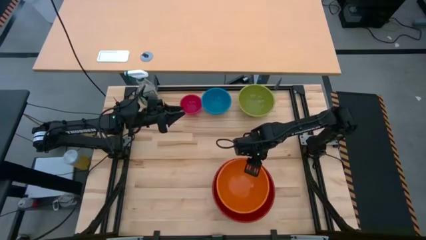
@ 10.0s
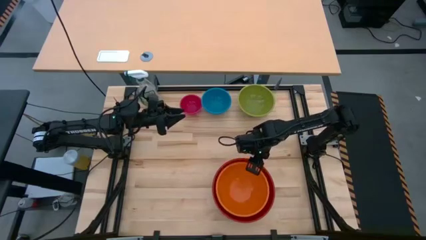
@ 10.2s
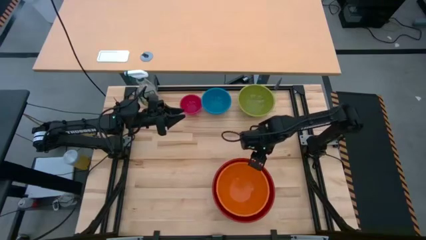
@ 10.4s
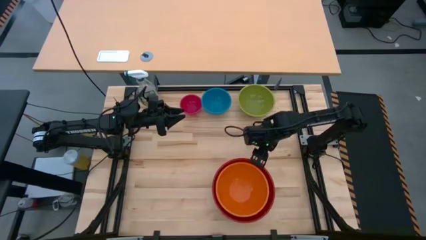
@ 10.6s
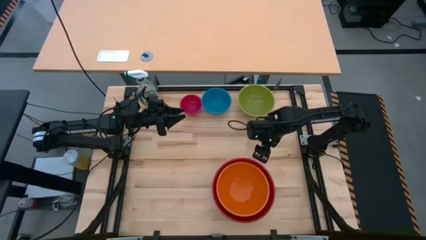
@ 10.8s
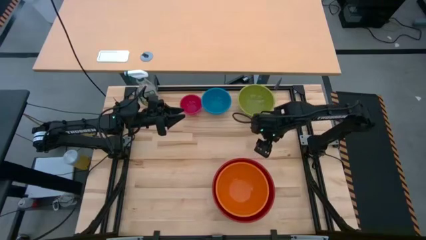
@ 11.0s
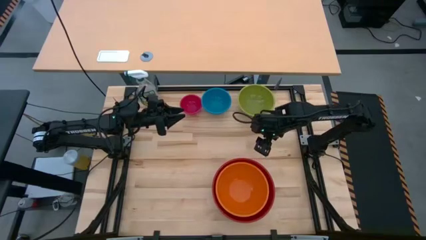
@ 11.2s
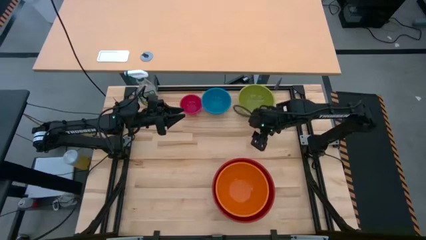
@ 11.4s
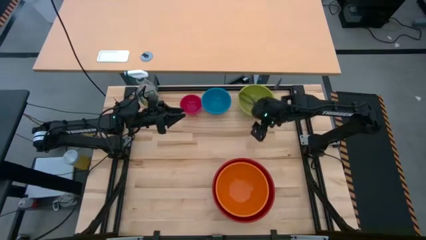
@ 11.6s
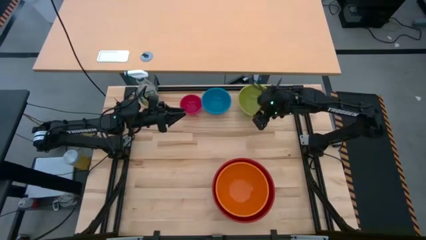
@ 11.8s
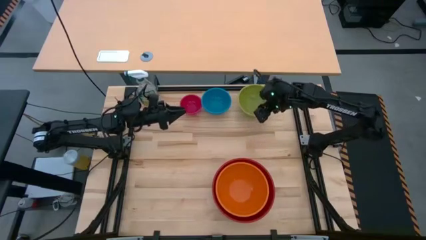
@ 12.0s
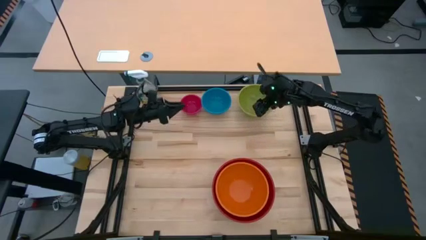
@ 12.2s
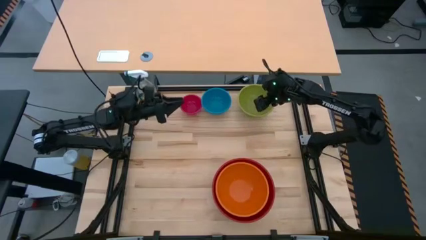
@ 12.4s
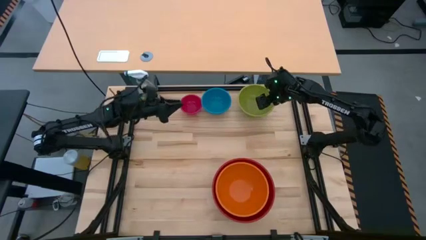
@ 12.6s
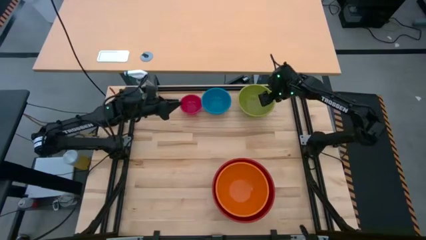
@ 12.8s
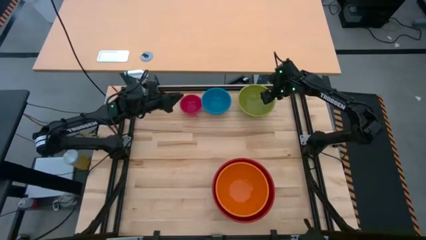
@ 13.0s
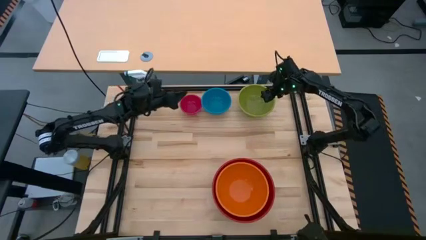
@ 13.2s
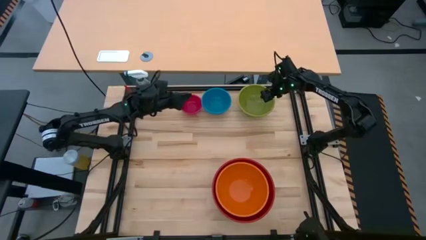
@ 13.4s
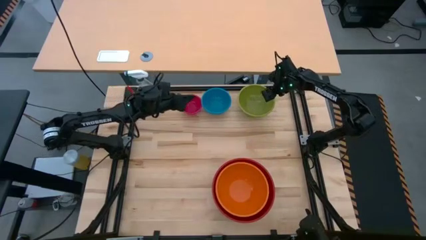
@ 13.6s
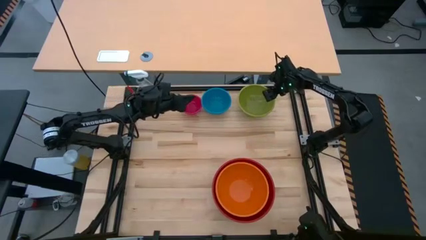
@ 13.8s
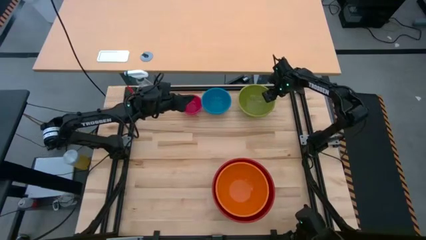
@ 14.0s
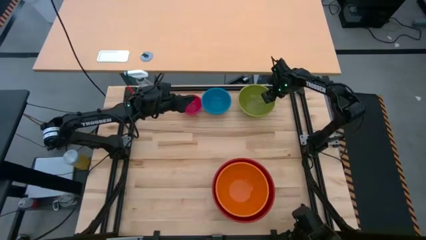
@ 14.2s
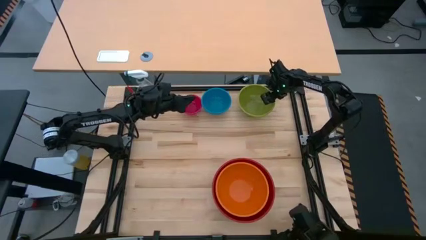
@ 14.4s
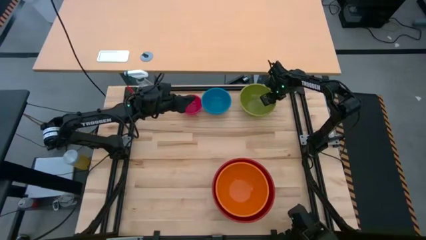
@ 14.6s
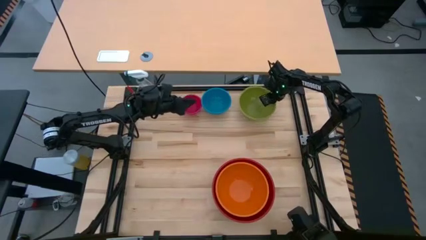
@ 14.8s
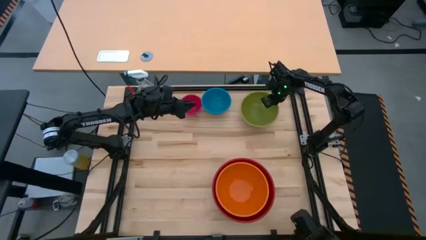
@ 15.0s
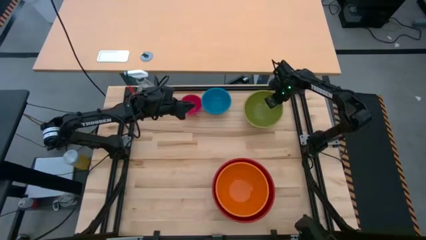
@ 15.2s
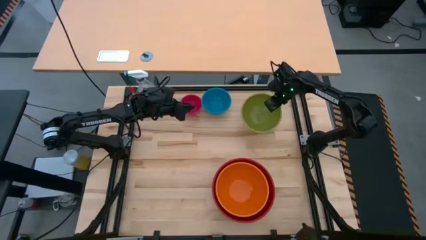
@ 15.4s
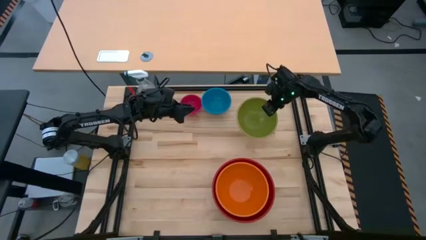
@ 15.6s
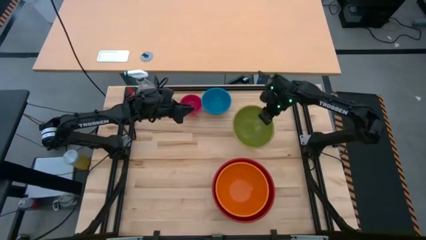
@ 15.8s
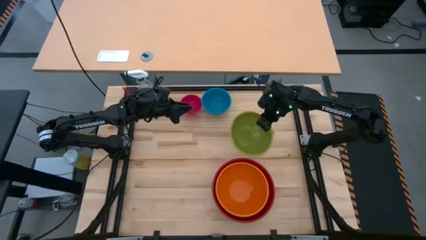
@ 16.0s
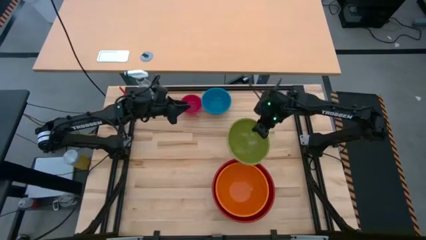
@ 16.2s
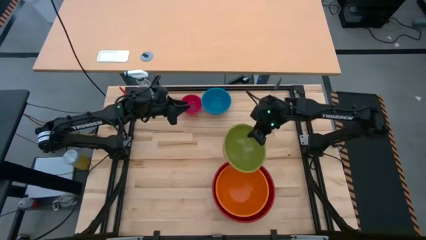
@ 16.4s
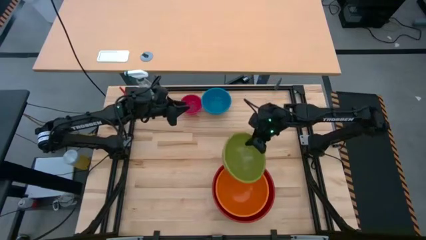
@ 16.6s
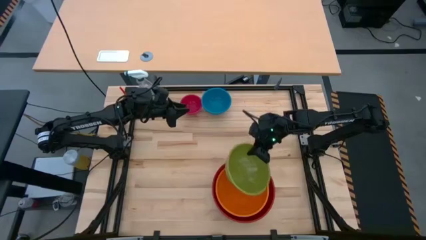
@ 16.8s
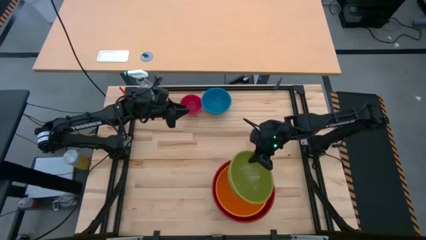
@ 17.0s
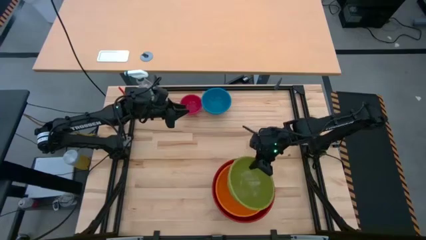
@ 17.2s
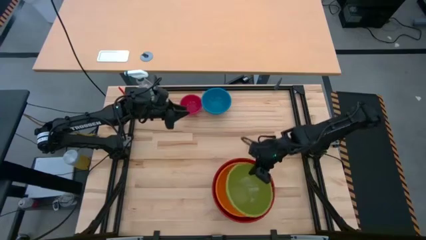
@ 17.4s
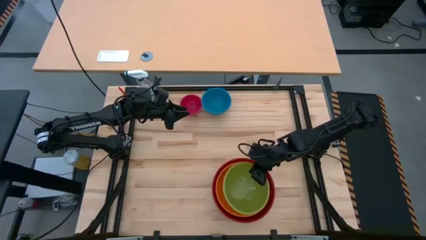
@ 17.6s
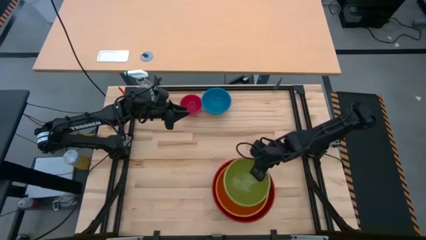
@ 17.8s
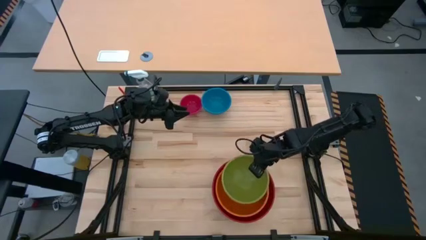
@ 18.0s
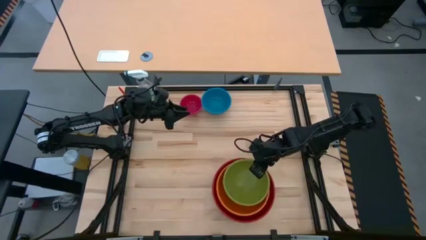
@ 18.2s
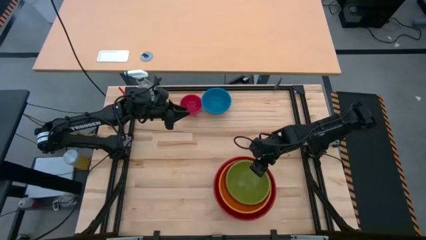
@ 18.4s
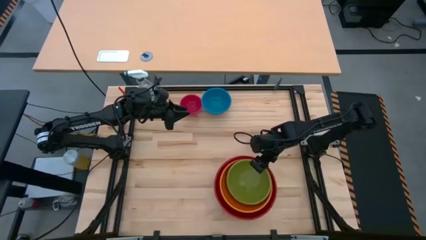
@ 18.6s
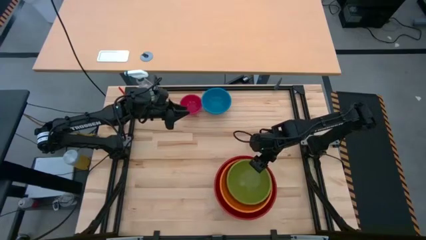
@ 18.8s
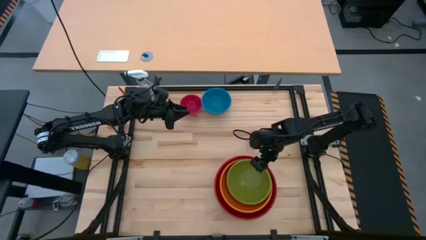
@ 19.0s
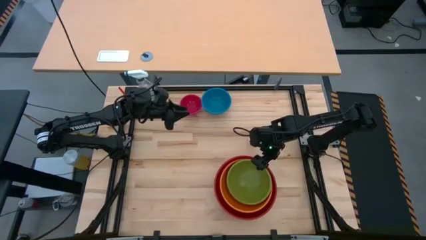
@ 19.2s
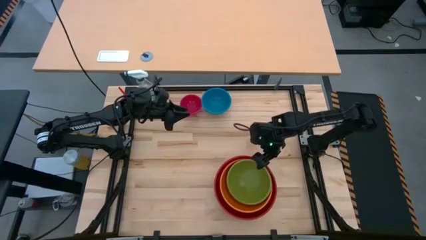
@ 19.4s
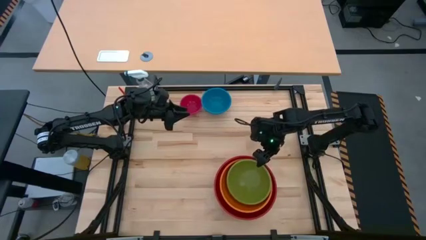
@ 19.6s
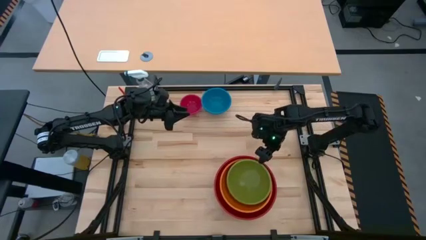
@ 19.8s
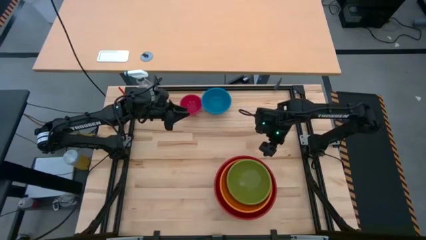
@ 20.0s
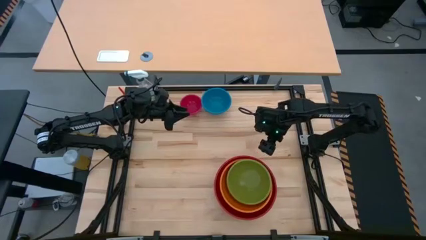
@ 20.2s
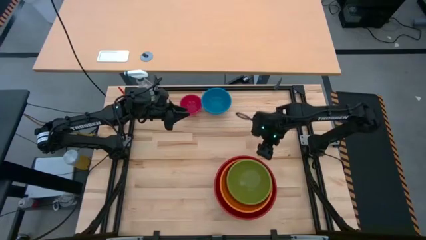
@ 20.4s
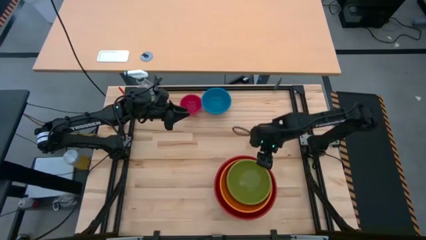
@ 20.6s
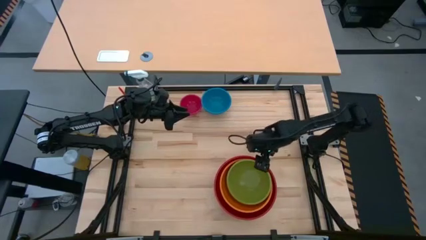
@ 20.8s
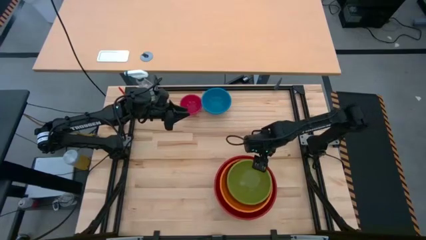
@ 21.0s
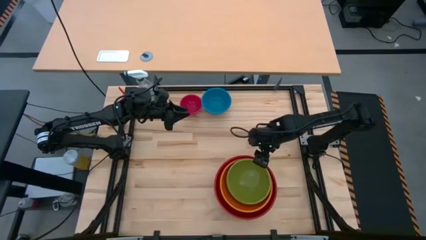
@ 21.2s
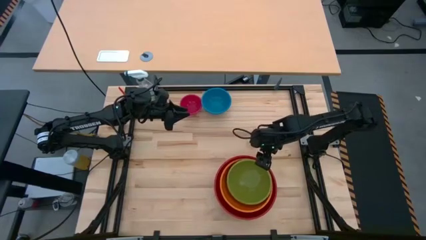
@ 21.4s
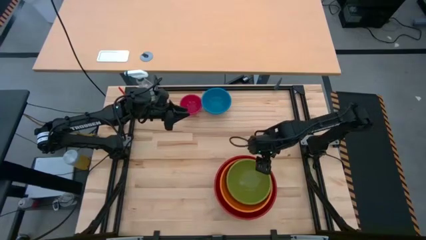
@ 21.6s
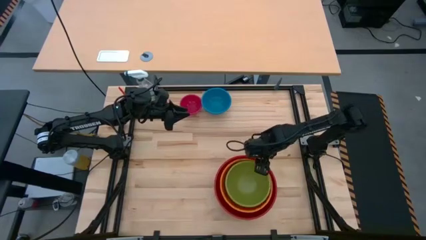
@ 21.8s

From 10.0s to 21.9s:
Task: Nest bowls inside each other by size order
Stack the green bowl into the orange bowl

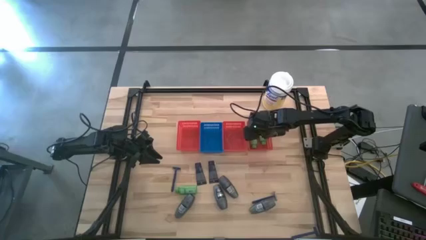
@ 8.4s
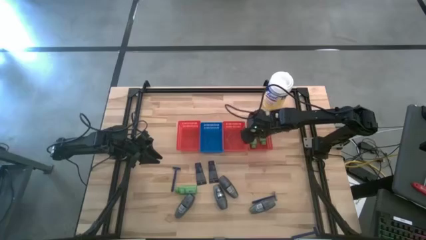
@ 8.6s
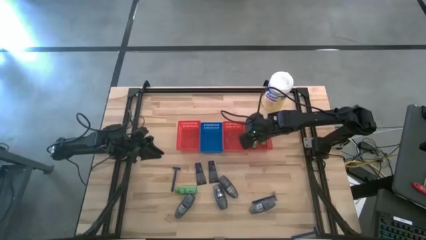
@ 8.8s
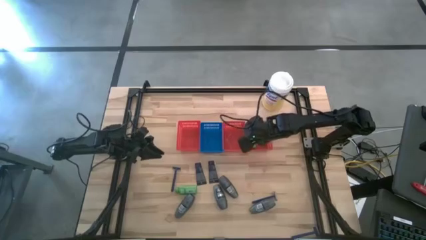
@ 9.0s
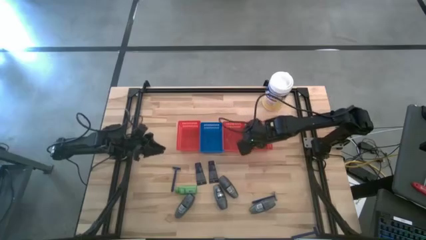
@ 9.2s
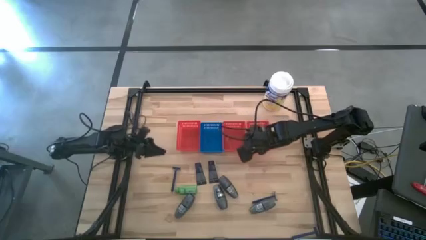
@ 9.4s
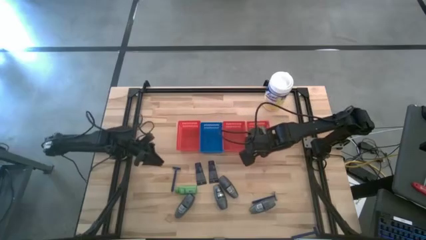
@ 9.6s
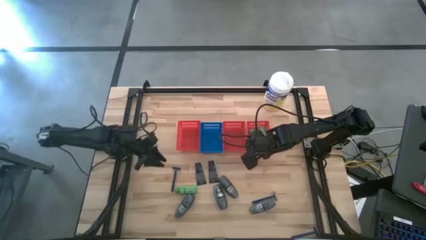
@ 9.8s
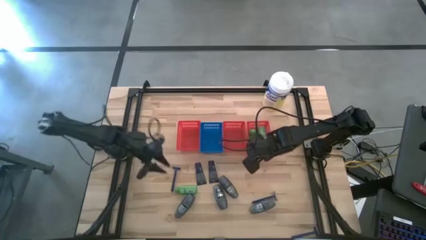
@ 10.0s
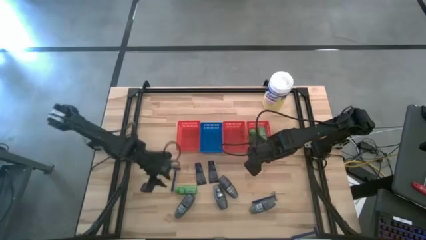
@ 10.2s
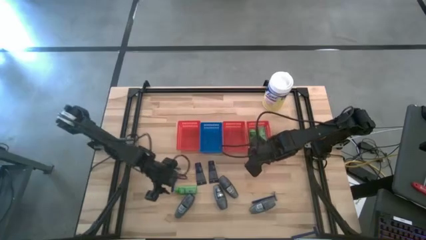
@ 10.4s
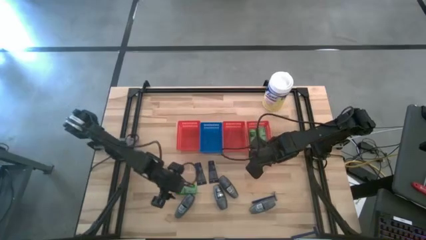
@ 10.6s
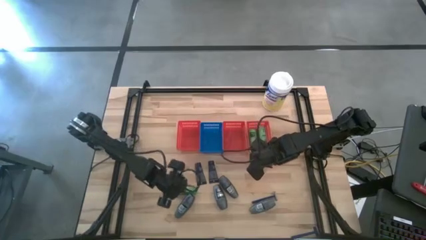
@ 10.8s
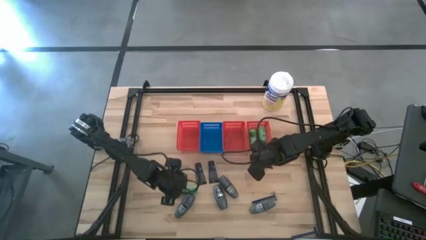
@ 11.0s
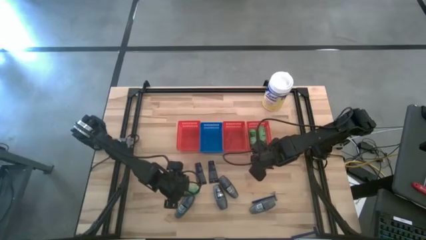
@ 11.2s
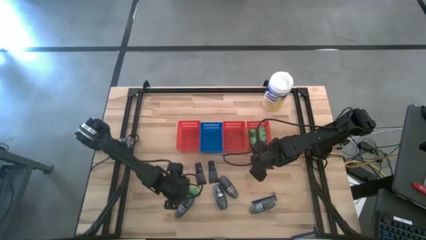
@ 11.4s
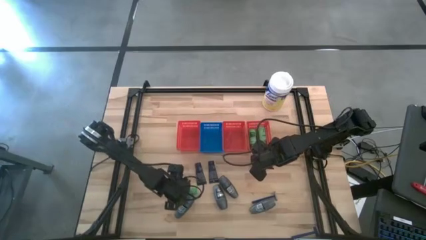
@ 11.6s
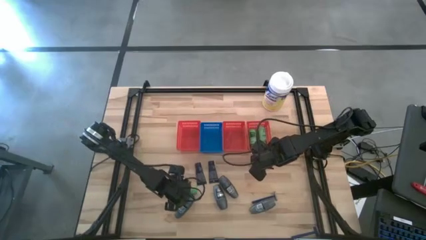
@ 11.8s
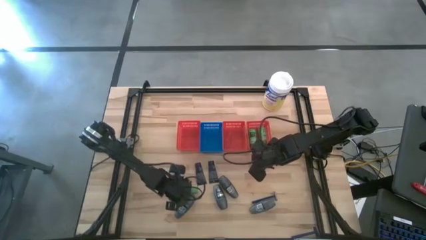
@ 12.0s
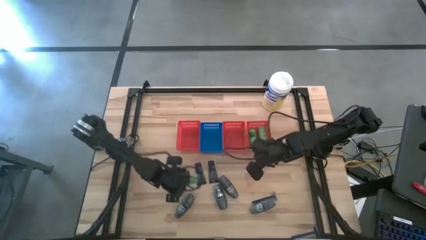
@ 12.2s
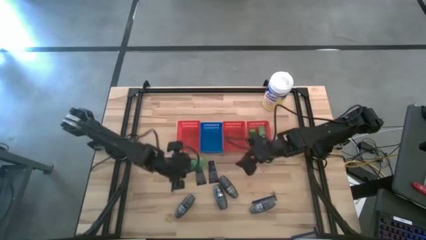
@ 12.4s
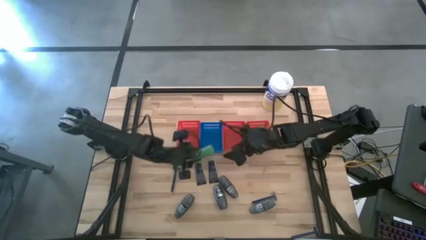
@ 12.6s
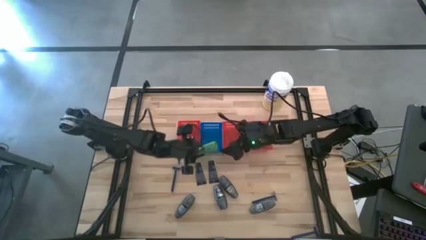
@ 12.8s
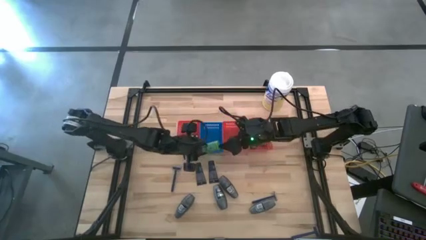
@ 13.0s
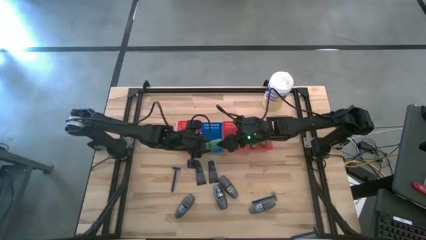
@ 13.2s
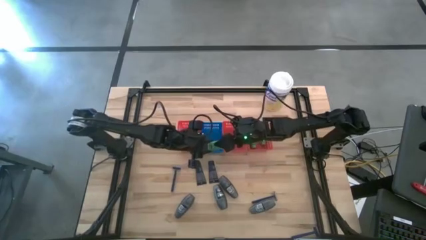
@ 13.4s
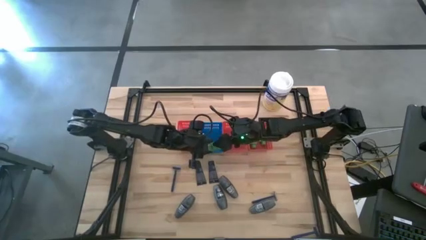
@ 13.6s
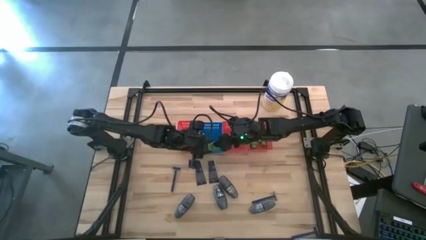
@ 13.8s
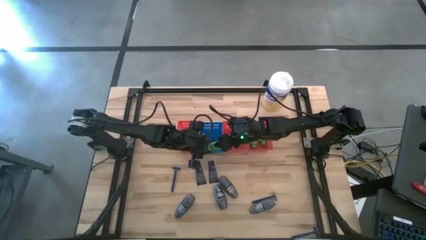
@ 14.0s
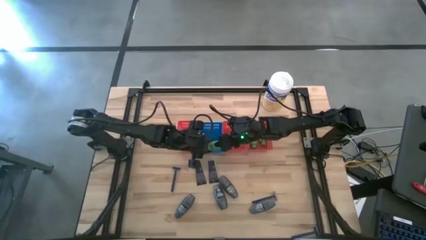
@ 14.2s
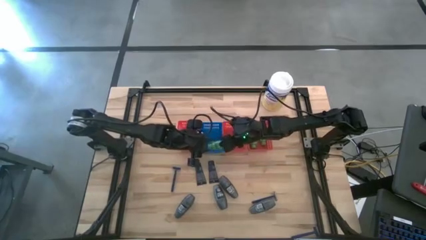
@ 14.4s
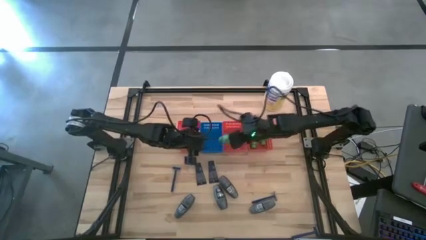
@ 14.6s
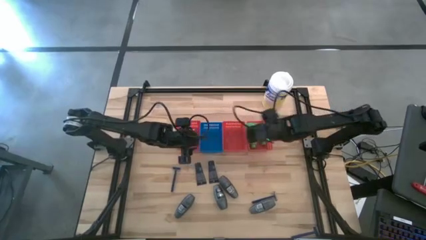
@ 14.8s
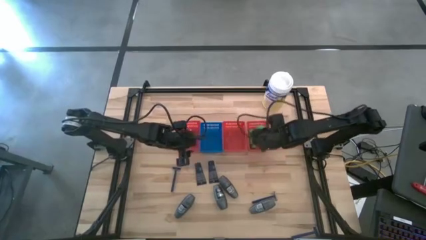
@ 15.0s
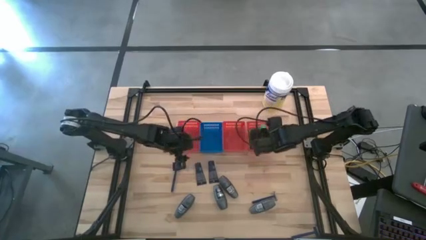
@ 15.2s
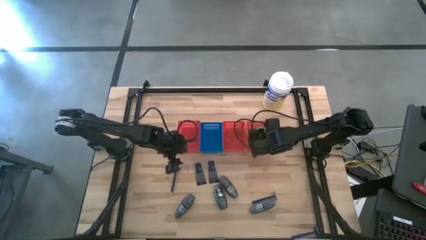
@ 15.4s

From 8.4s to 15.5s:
Task: Pick & Place Travel size toiletries
Put the green shampoo into the right red basket
